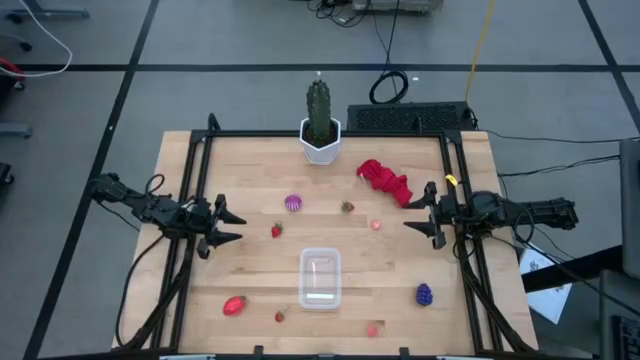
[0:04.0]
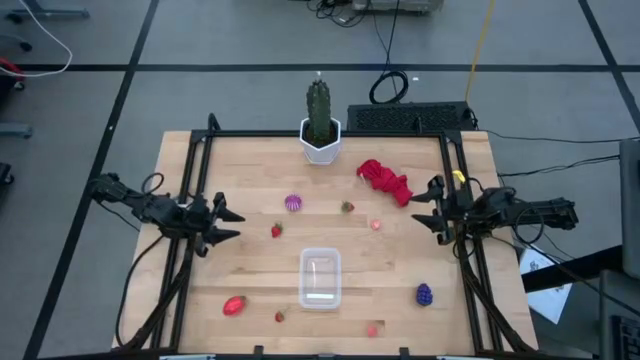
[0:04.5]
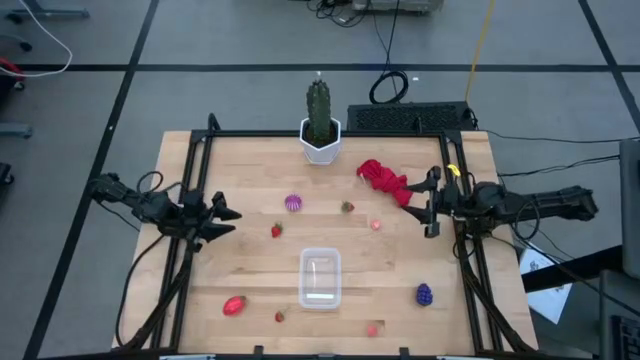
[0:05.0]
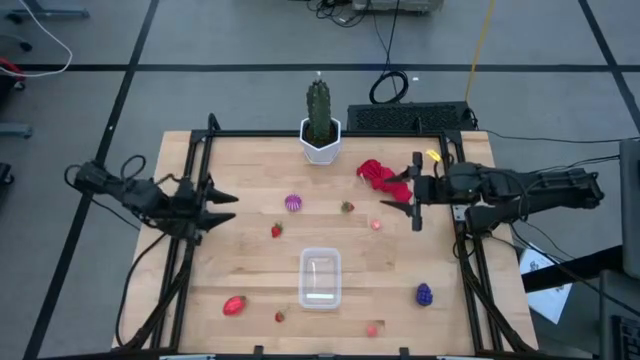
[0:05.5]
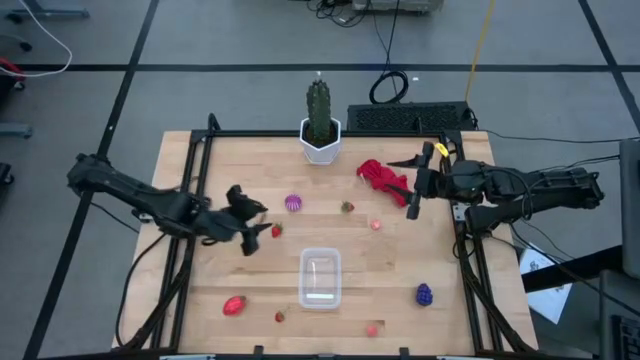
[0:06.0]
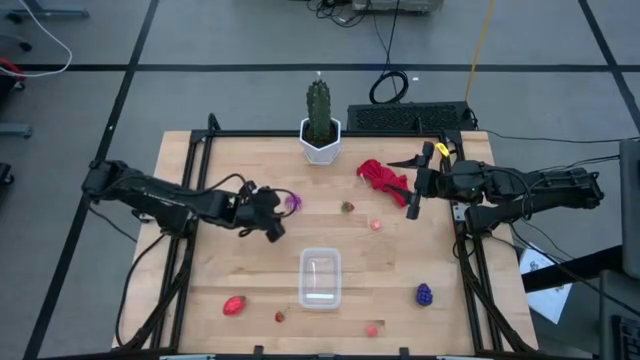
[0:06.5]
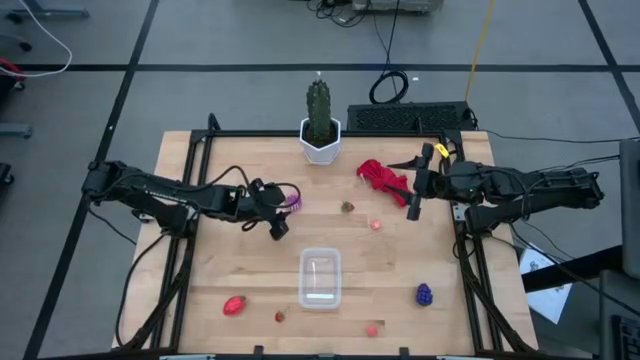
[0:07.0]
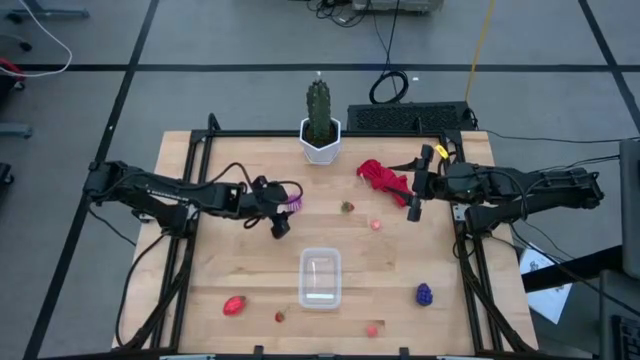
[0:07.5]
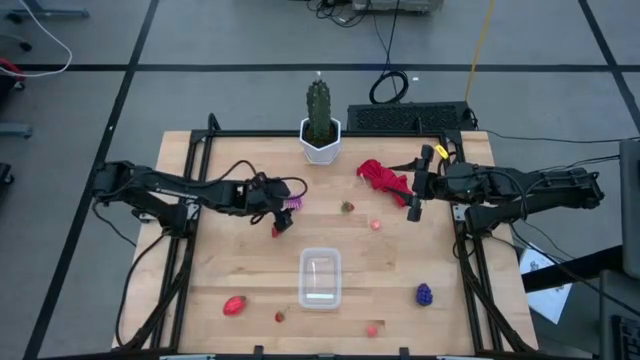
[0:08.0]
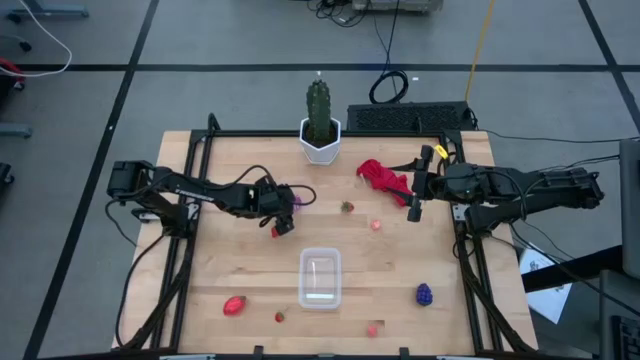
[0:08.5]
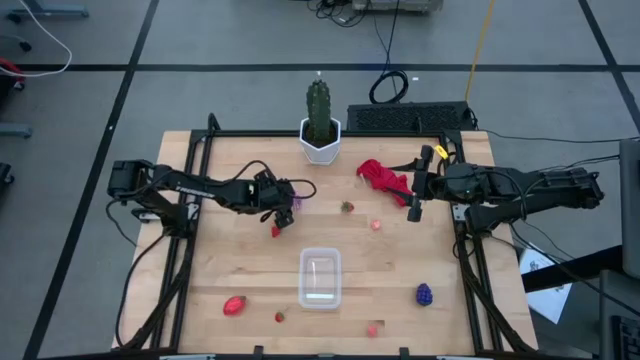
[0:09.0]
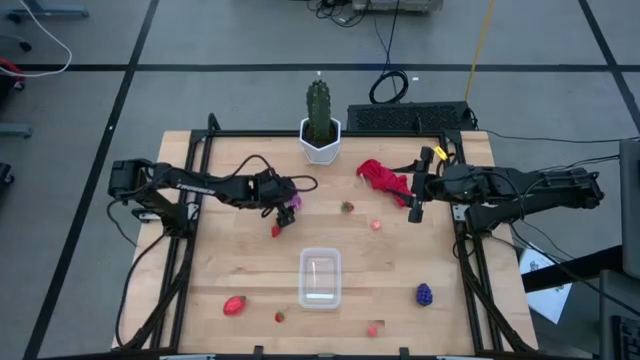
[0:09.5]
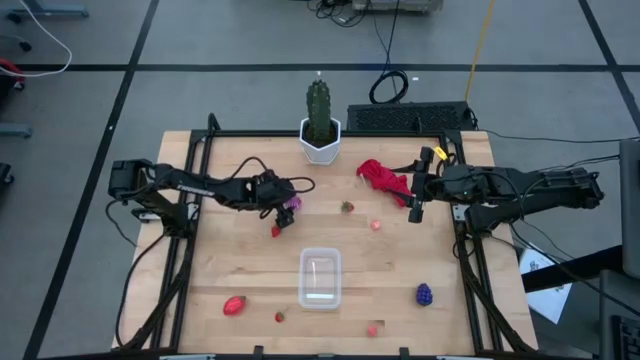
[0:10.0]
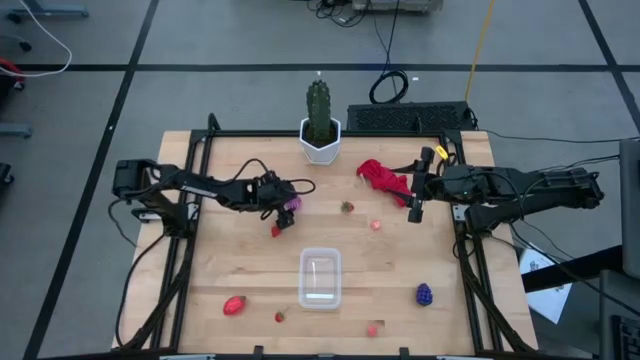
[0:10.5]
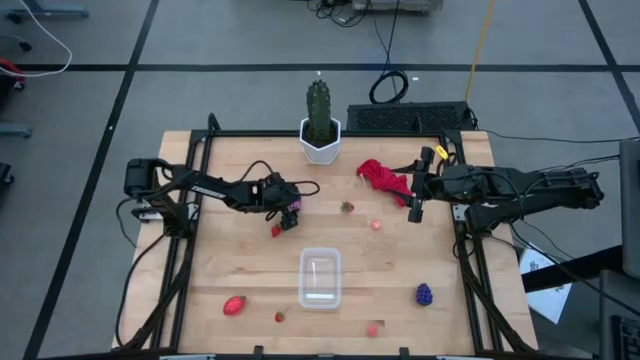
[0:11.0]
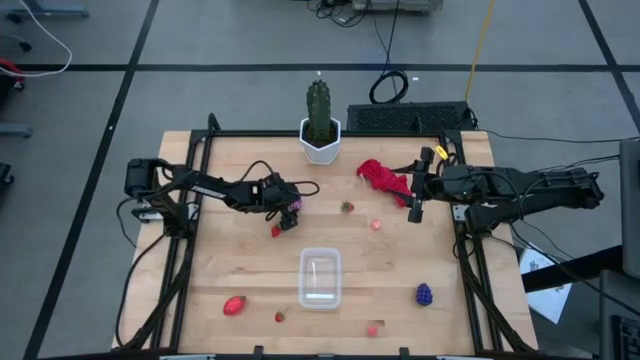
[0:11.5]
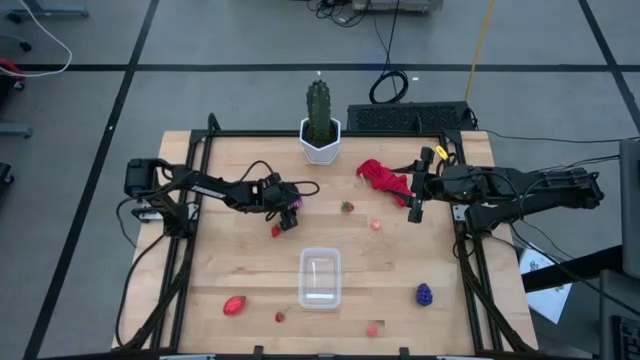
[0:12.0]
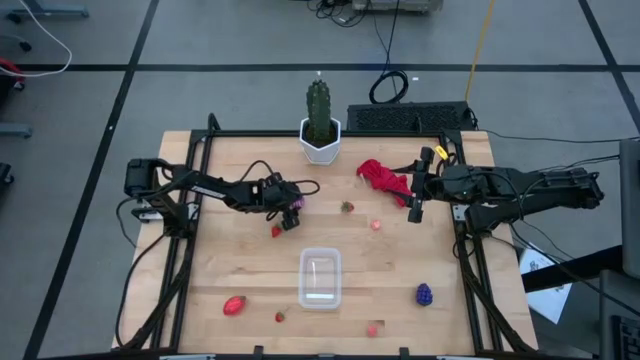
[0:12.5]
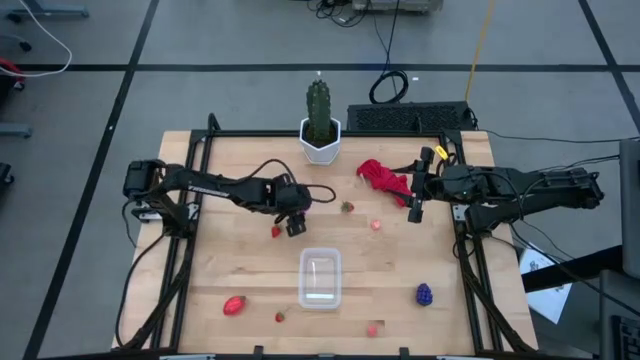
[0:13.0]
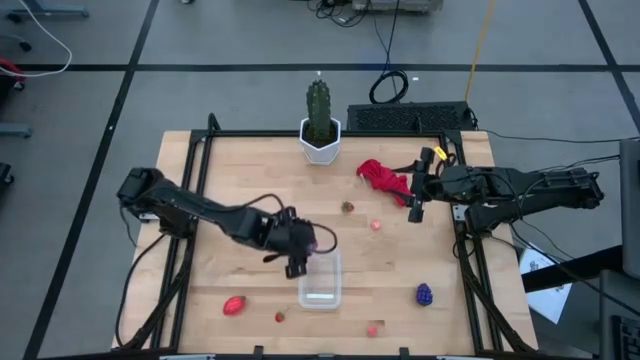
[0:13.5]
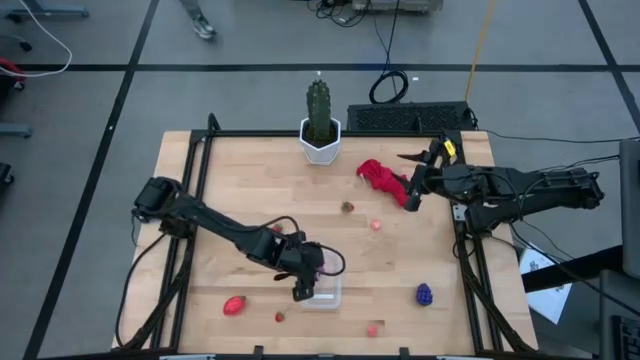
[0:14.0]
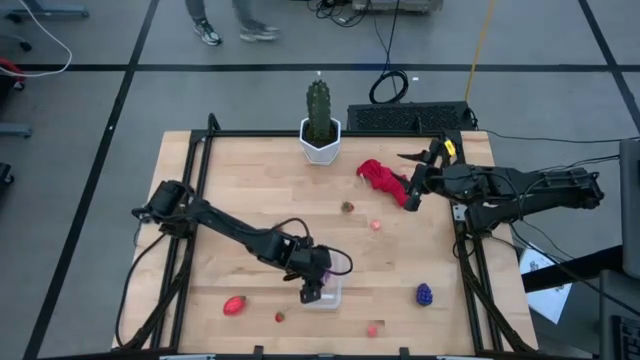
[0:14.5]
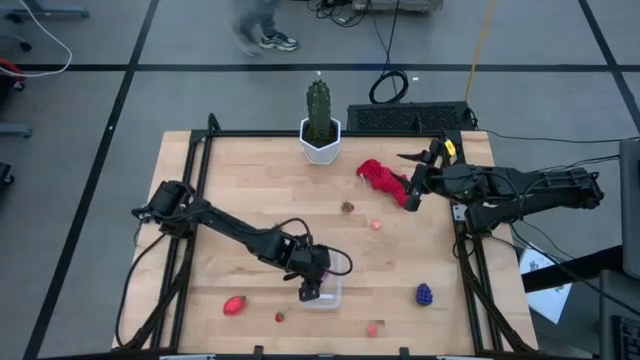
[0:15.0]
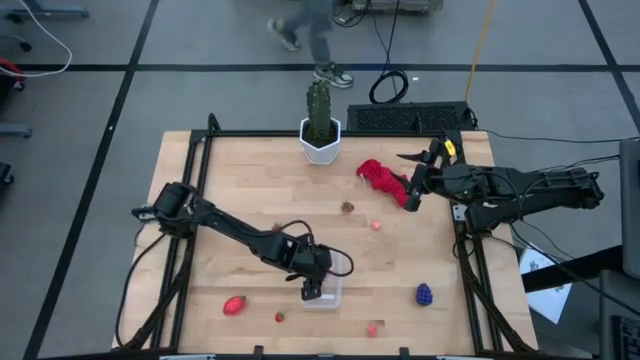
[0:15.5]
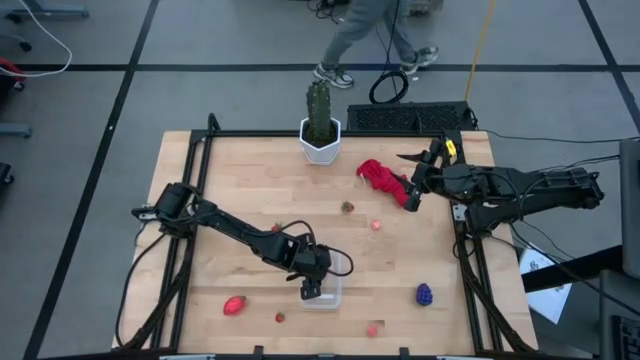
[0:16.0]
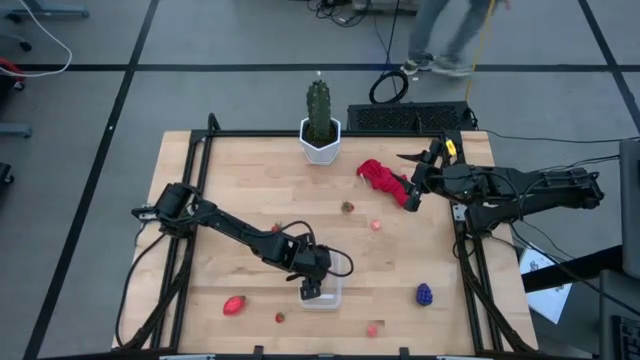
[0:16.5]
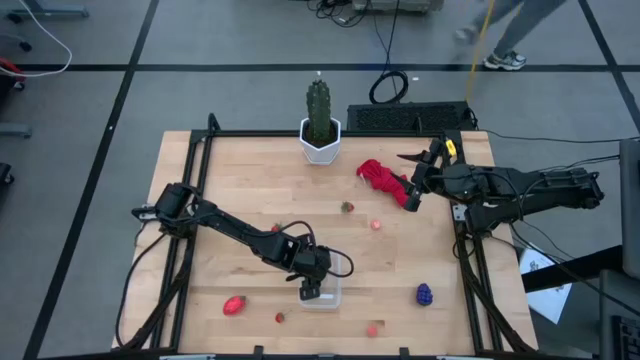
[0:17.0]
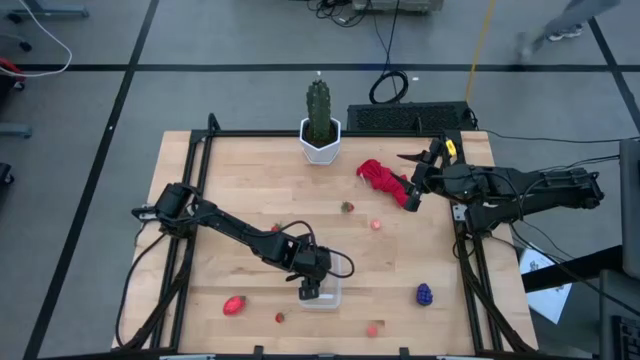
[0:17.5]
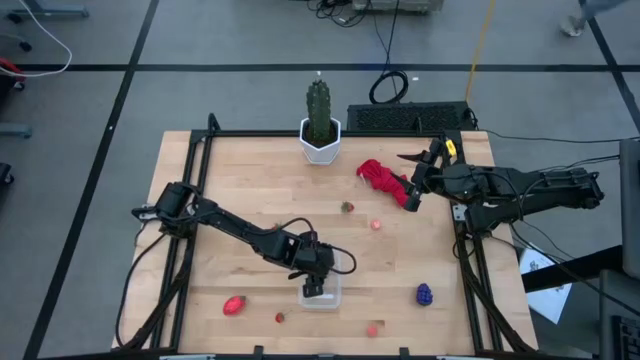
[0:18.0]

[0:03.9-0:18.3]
Task: Pick and placing Produce into tupperware
Put the onion into the transparent container

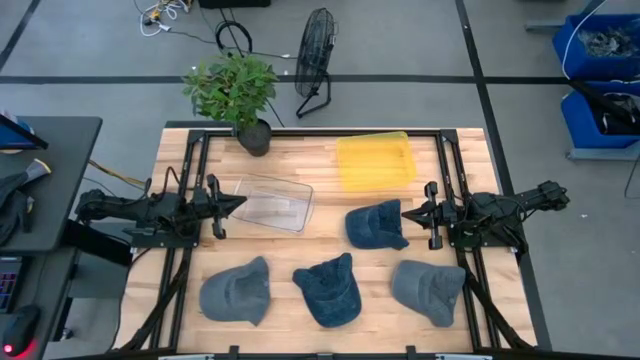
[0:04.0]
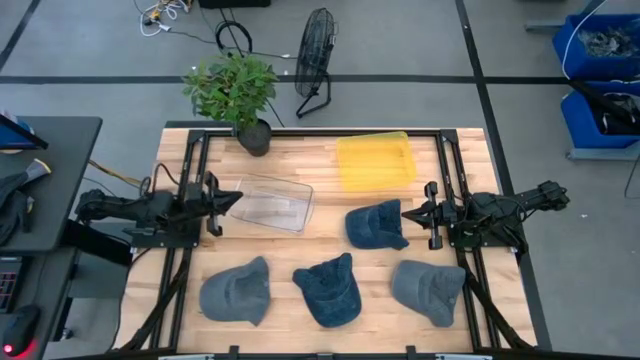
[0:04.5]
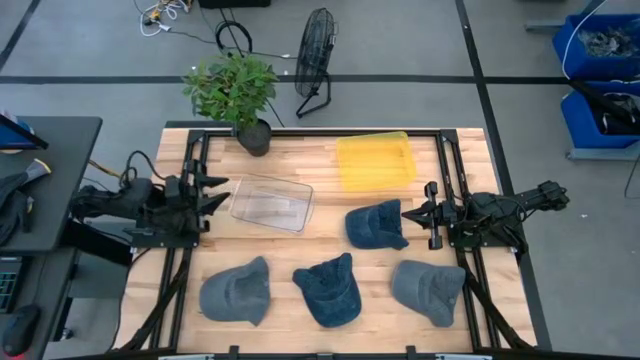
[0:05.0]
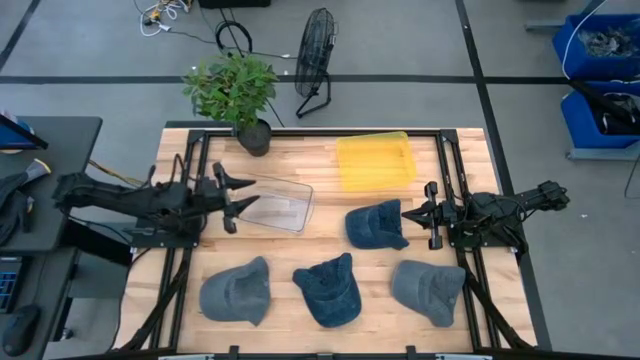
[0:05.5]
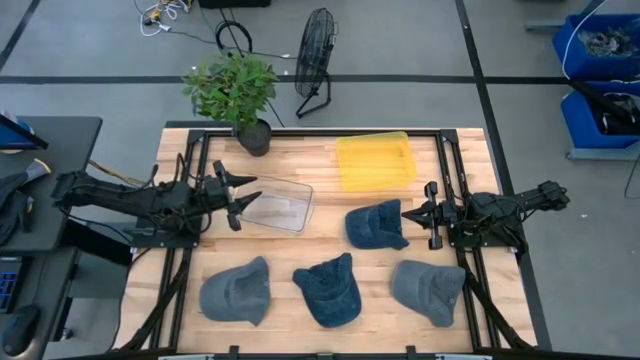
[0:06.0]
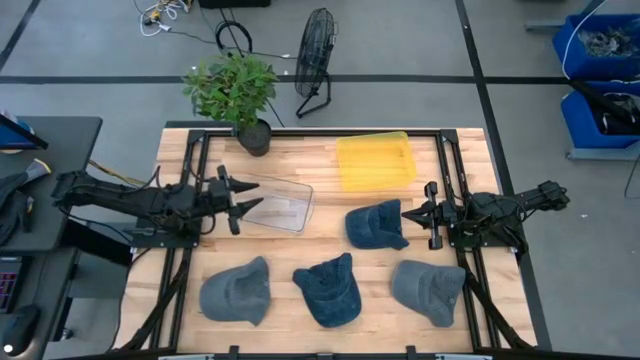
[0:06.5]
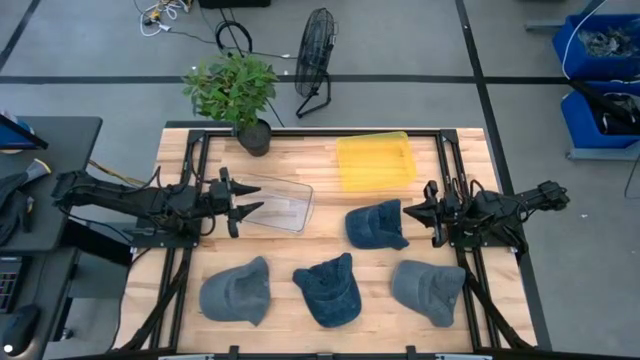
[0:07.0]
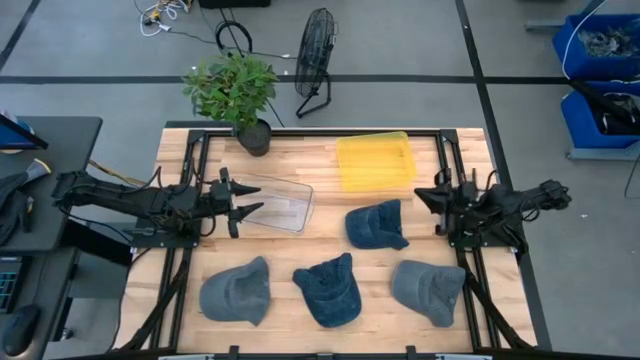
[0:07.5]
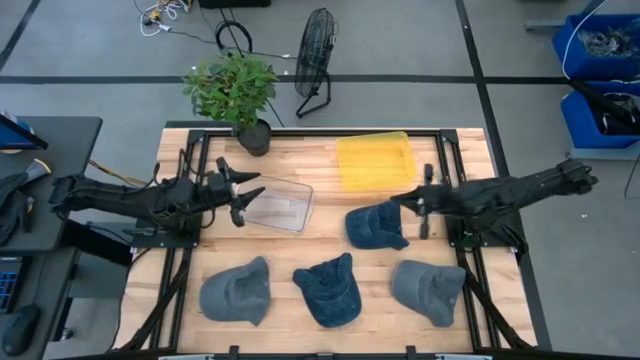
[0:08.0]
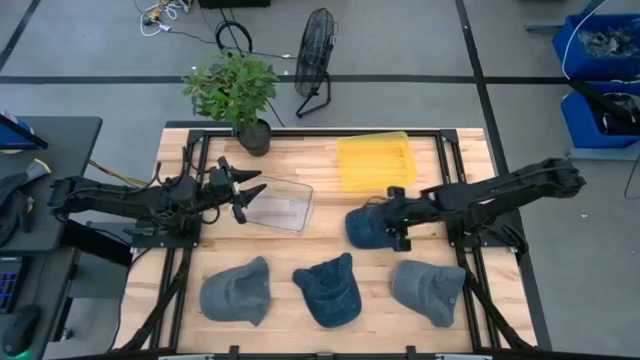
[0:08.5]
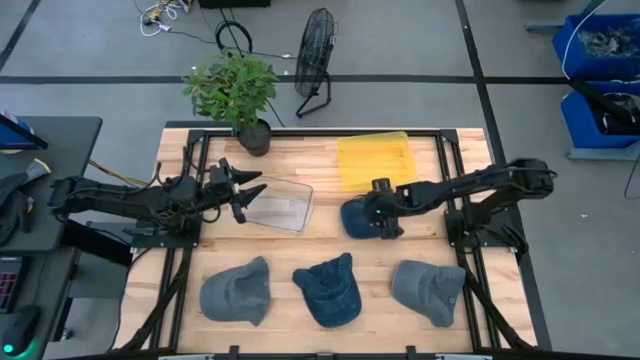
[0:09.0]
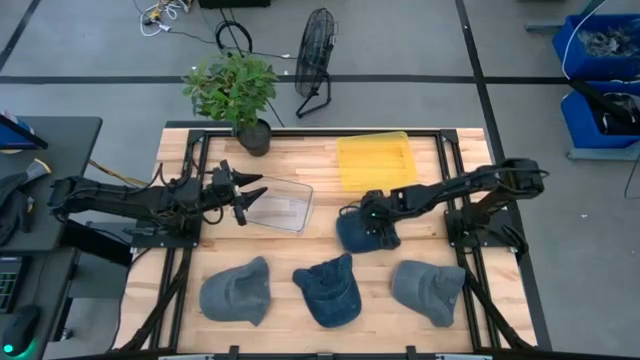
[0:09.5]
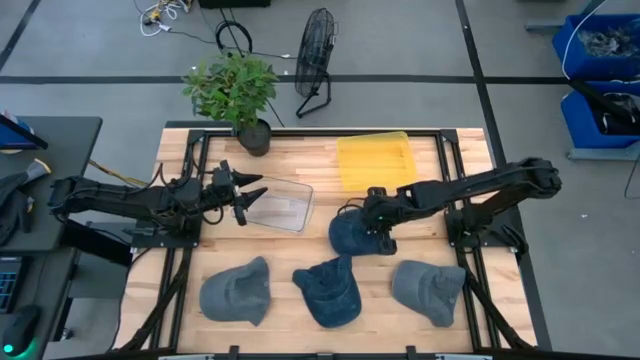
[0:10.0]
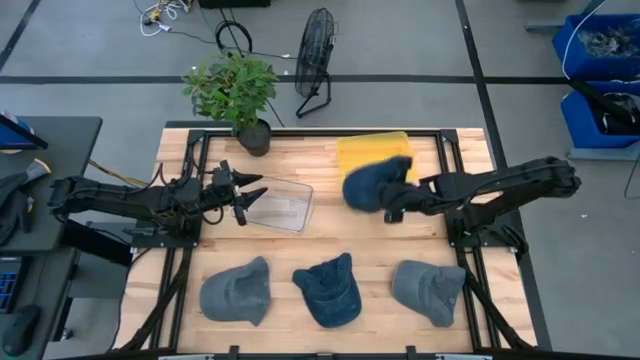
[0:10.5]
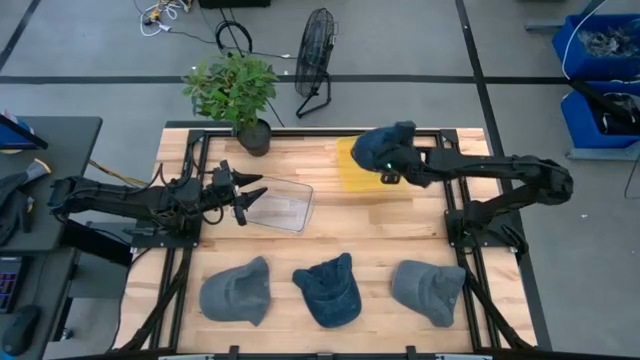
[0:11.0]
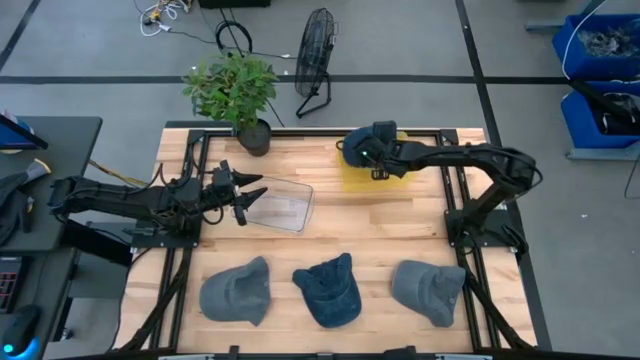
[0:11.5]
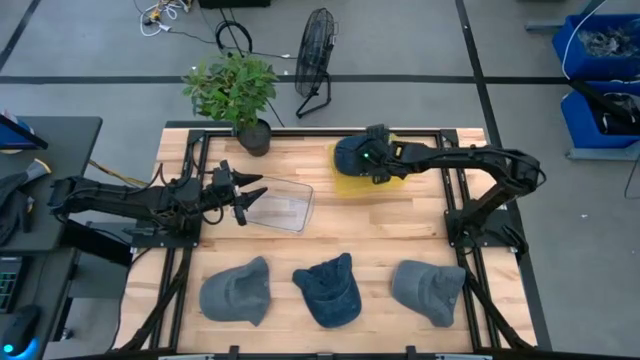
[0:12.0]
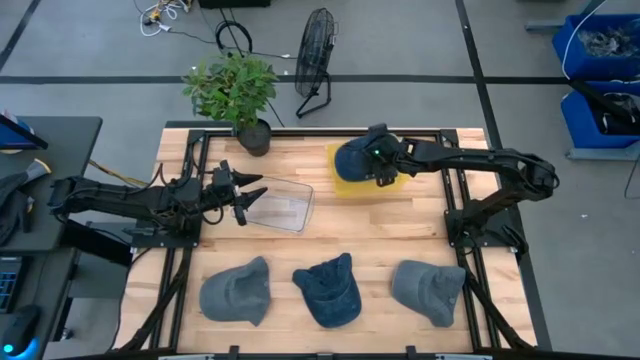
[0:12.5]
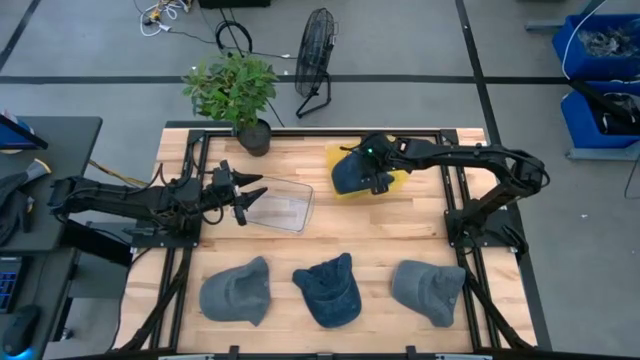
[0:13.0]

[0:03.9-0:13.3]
Task: Pick & Place hat
Put the top blue cap into the yellow bin
